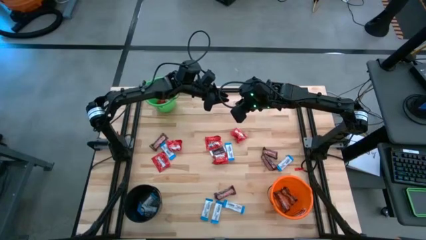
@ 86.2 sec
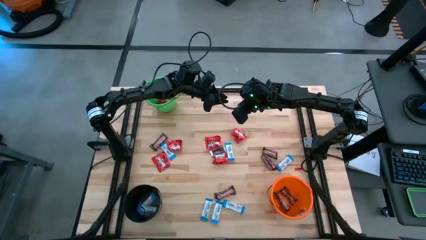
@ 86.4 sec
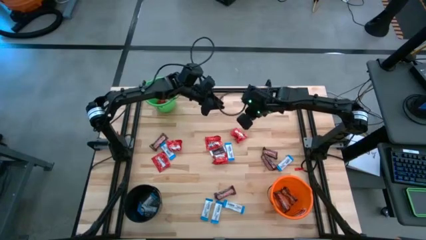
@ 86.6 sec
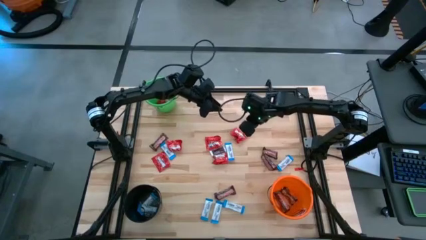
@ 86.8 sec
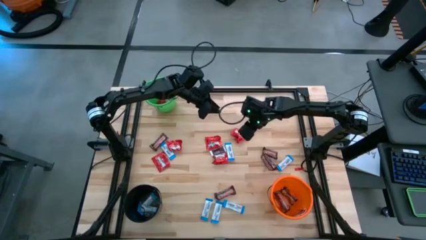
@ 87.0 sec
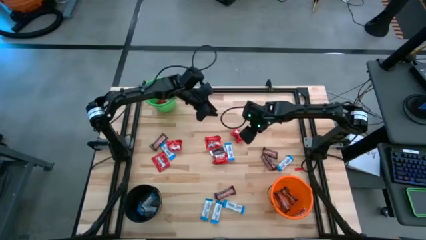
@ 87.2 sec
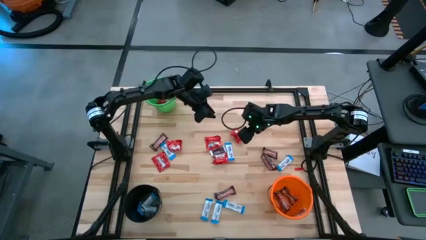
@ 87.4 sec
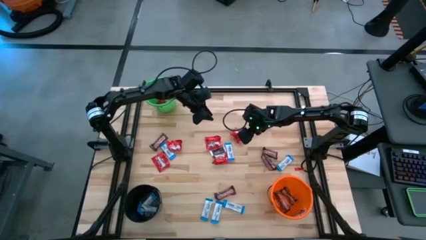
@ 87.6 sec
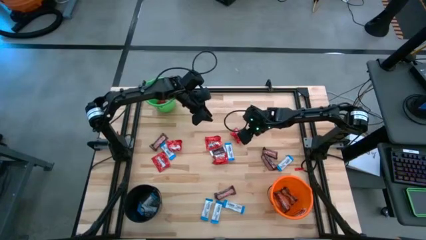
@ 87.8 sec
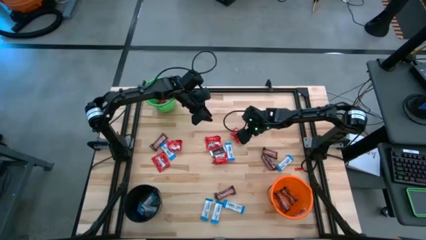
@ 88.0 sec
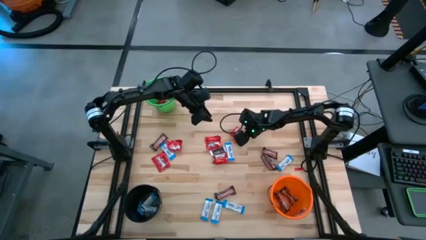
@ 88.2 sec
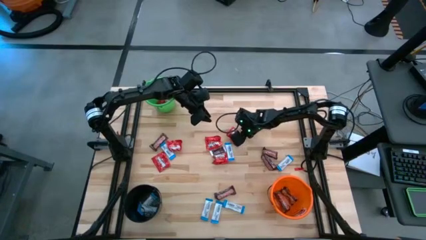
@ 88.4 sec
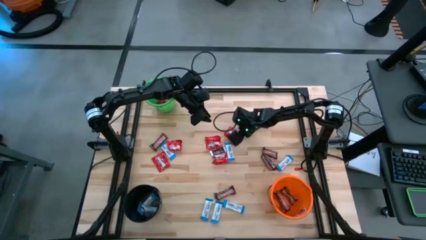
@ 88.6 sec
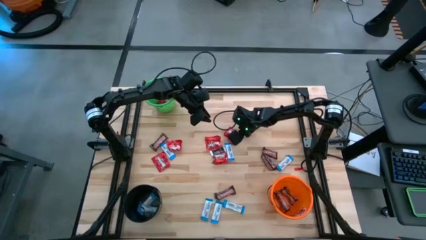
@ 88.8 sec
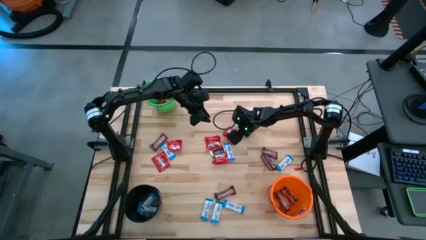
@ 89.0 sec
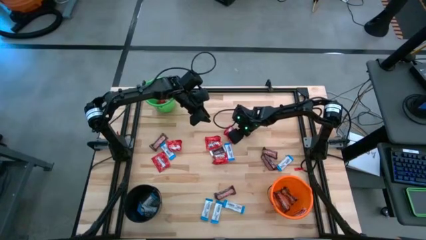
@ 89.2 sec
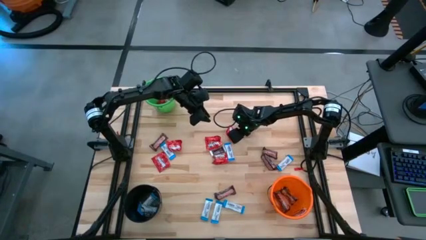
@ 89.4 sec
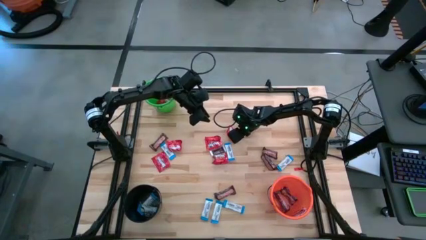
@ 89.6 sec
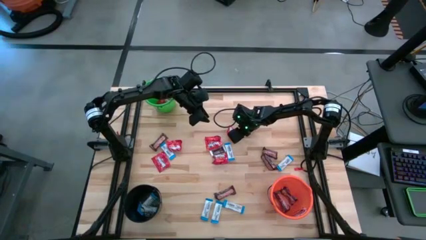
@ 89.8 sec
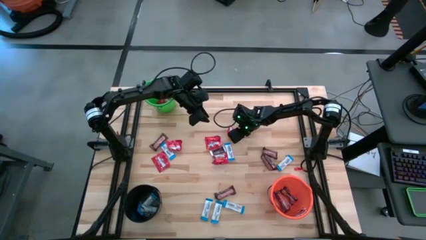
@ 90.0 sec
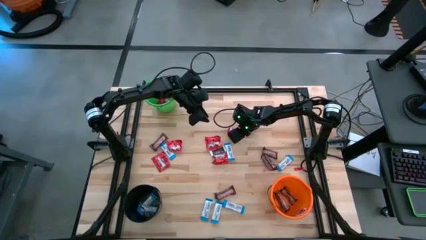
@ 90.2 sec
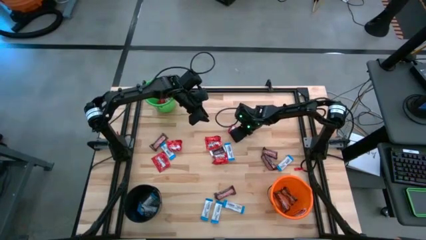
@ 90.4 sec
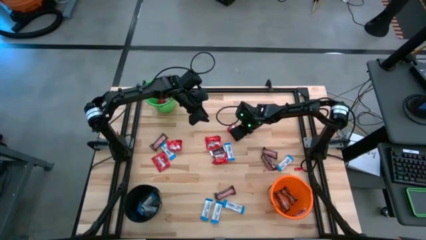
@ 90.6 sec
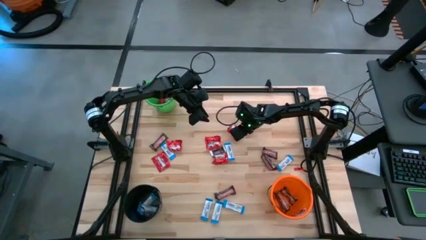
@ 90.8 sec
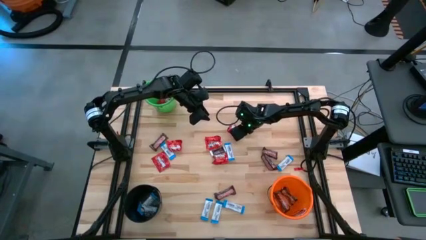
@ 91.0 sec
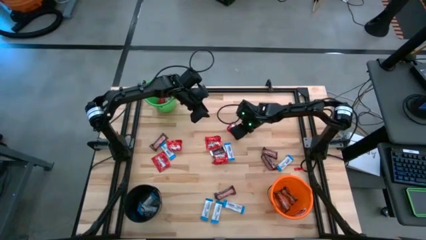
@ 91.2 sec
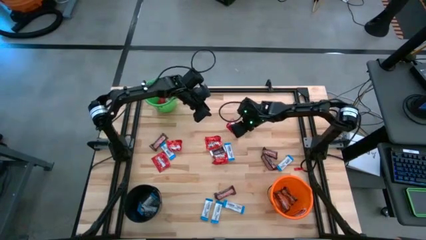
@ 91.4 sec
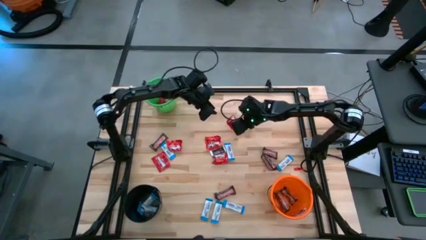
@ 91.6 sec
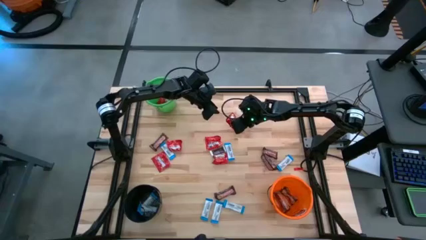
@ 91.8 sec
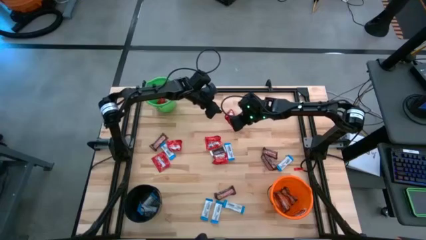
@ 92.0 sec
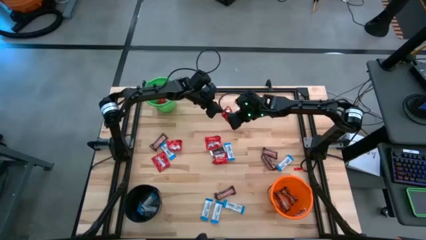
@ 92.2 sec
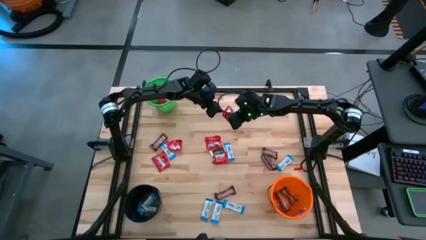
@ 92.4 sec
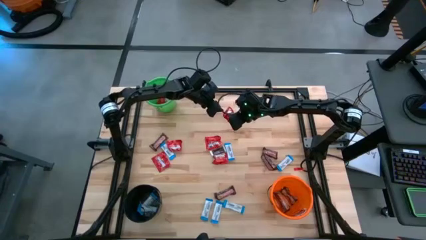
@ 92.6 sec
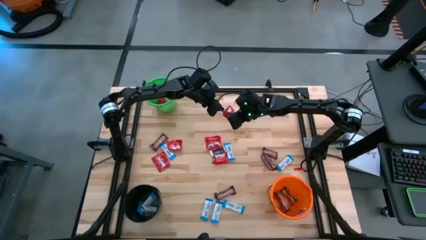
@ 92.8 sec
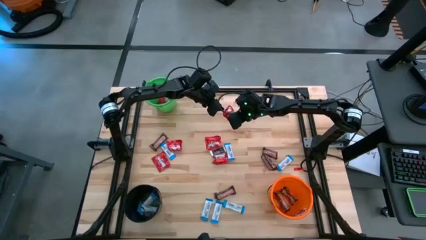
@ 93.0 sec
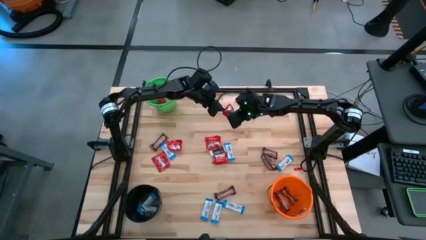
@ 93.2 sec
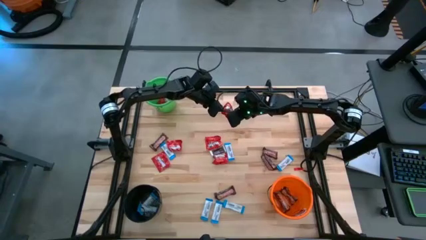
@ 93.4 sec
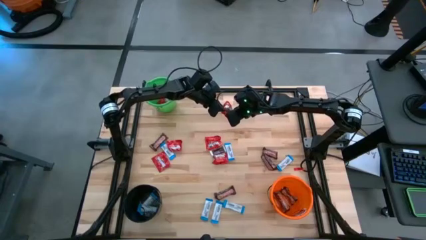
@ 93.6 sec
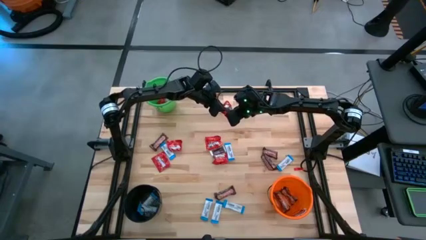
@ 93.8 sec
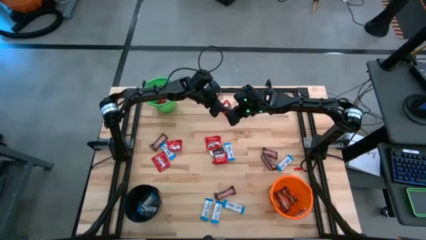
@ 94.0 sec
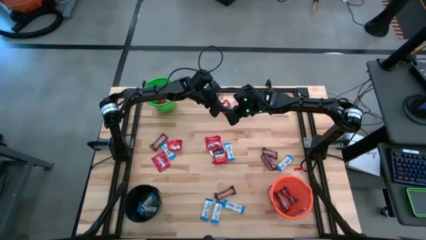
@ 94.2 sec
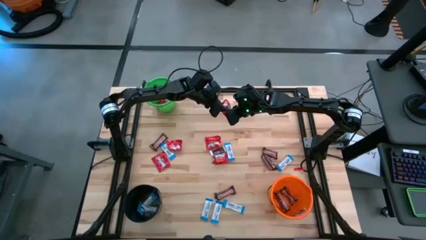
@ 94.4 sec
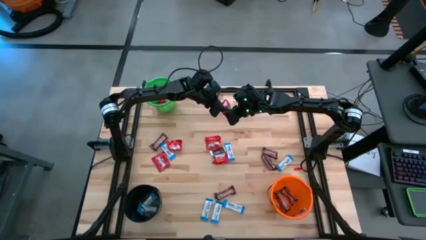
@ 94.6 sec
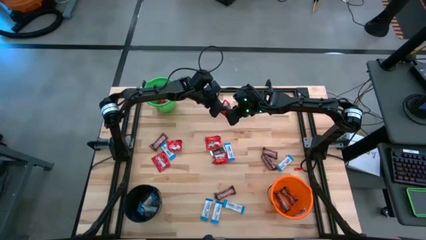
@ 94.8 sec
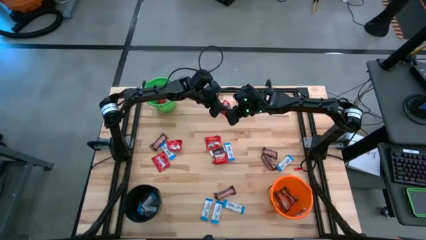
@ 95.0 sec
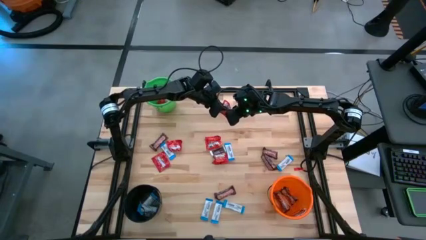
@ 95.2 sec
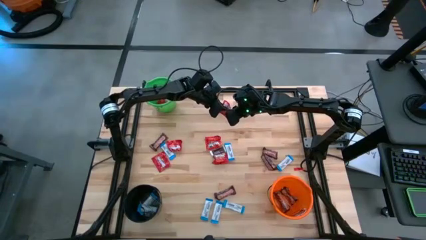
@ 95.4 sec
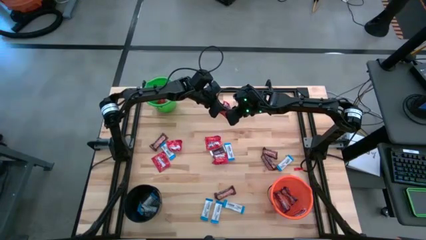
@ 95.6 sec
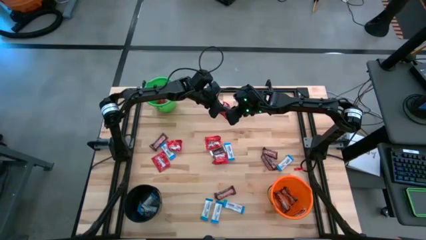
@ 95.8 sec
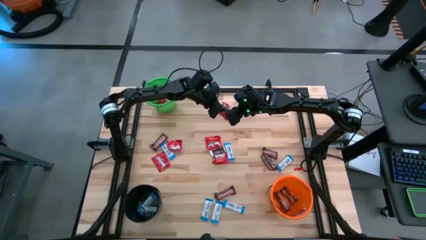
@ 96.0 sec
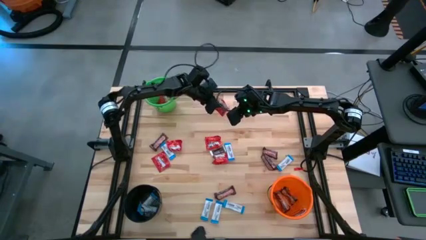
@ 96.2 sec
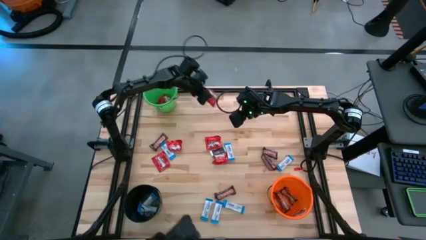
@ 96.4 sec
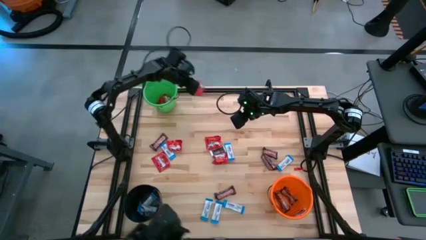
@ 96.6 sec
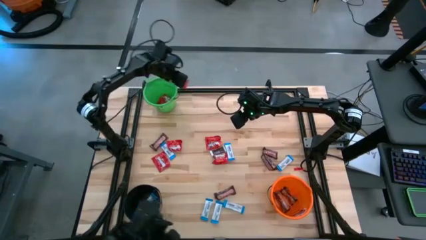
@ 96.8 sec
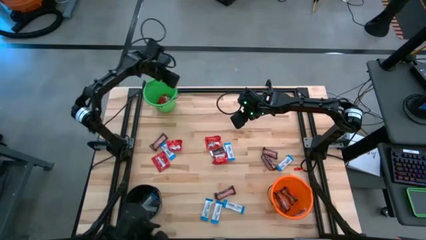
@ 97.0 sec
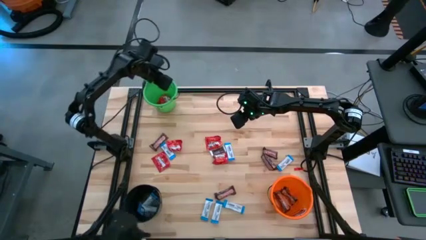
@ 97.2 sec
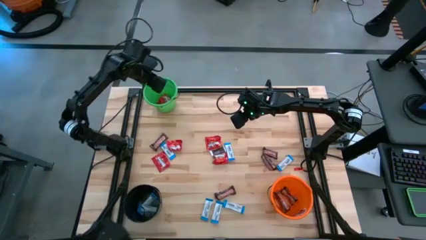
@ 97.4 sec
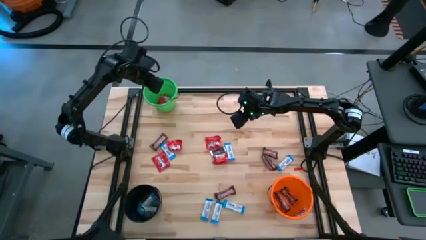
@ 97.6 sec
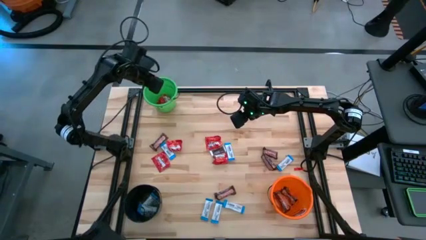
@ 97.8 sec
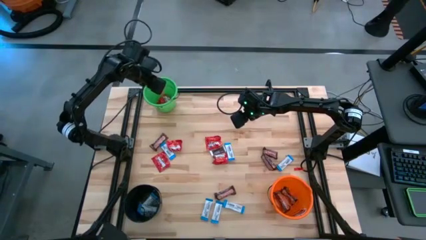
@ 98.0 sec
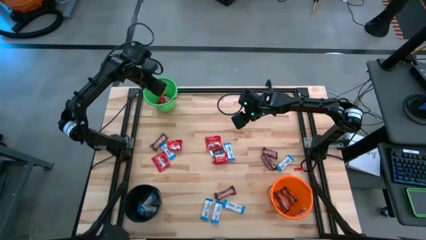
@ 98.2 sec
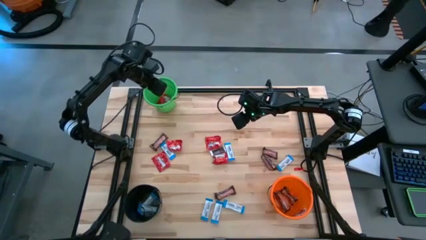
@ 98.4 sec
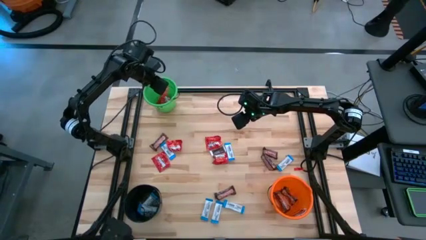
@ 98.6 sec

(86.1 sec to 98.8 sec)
Task: Sort candy
Put the red candy into the green bucket

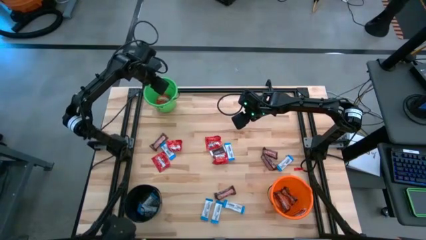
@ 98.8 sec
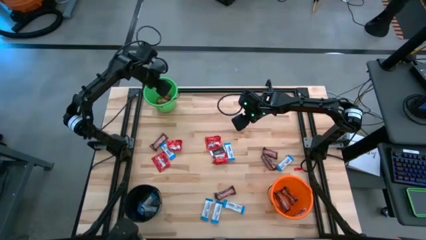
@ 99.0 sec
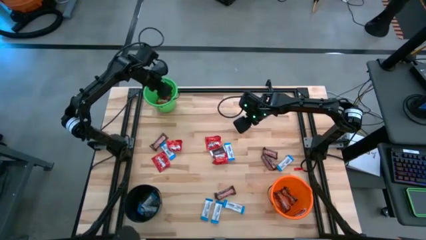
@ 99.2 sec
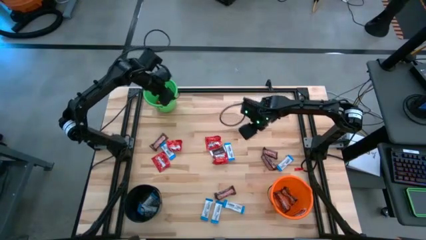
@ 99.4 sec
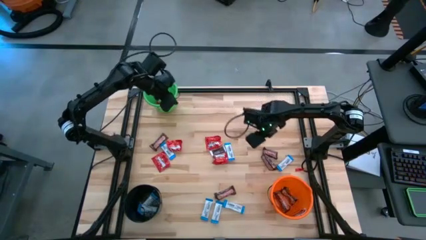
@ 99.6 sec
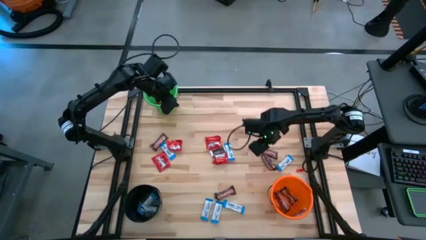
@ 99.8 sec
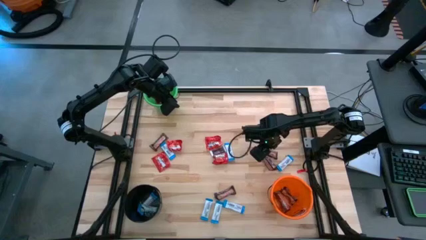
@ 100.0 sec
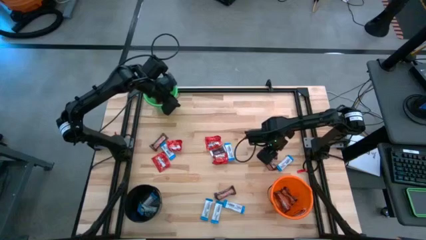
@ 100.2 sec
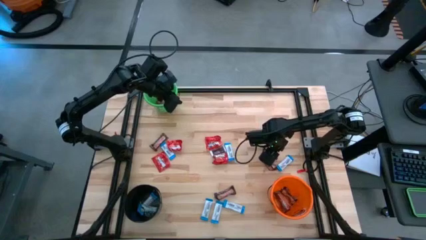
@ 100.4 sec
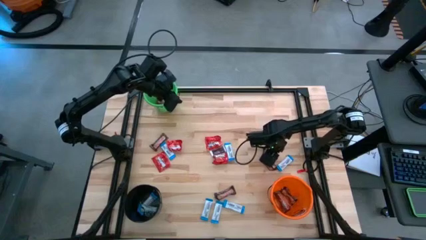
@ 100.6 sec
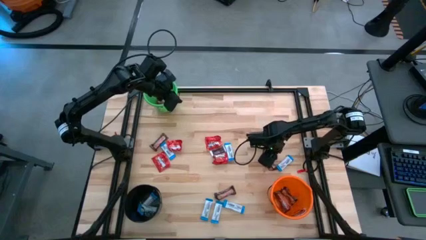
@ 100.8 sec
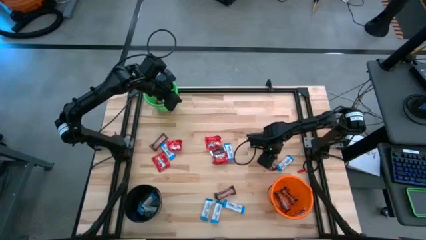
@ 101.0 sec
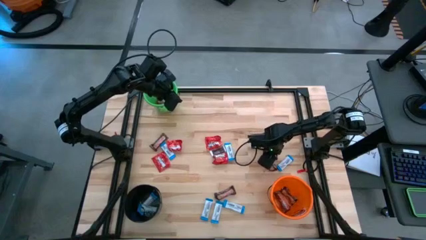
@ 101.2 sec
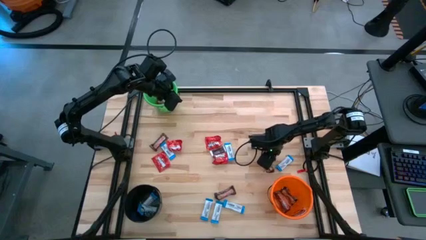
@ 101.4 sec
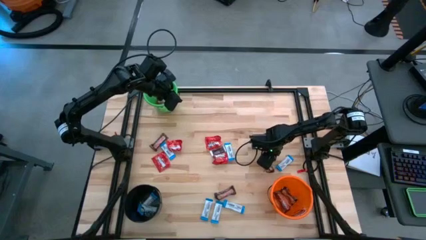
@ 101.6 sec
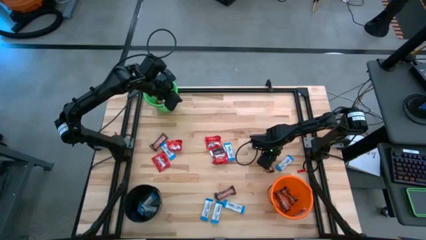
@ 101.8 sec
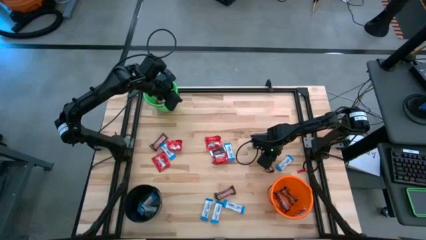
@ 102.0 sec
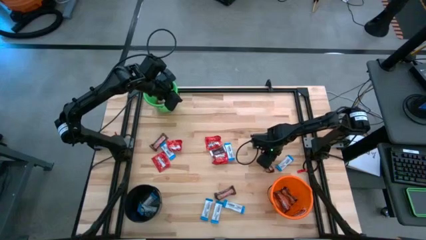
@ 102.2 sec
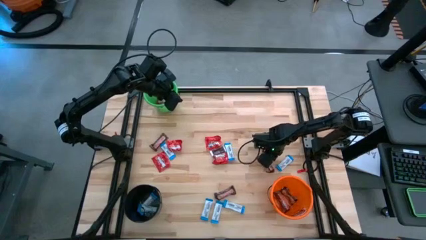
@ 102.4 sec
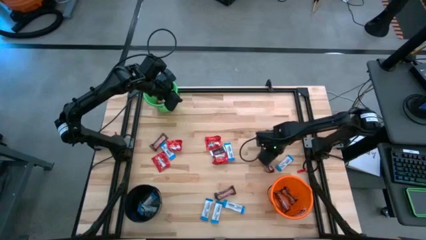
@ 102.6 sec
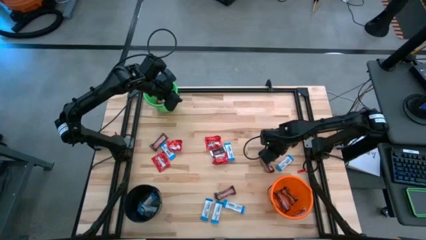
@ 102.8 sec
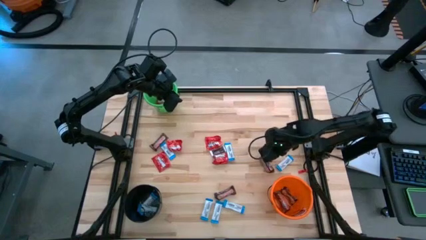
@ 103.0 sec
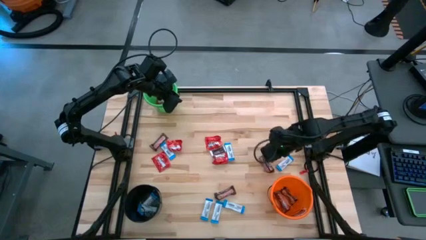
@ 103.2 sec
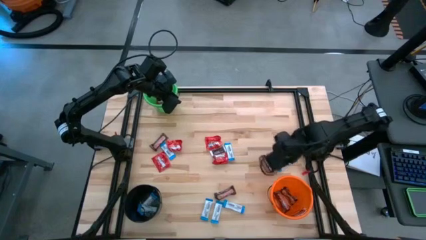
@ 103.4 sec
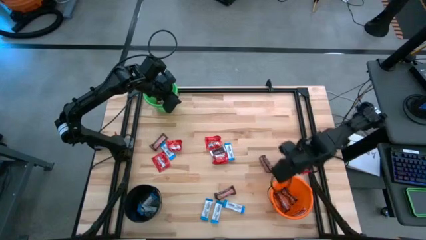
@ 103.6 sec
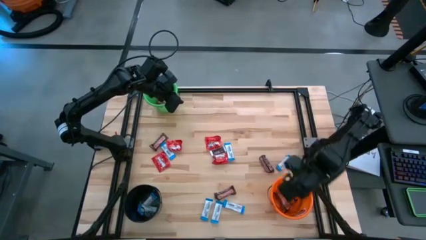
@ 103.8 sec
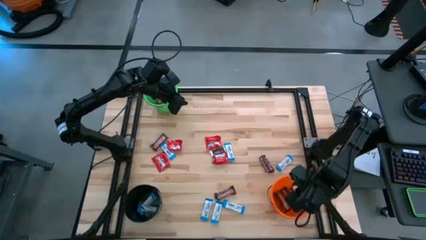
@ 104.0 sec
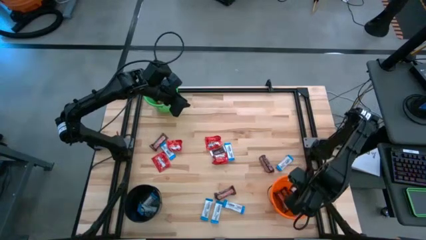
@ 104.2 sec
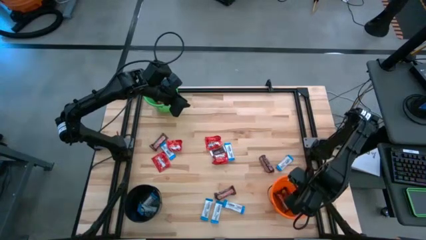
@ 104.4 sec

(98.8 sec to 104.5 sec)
Put the brown chocolate into the orange bucket
